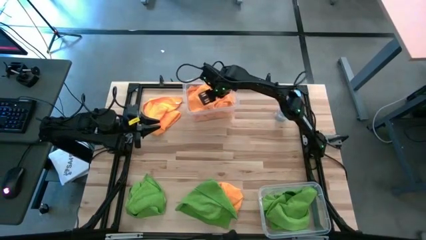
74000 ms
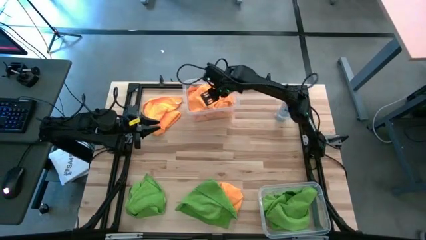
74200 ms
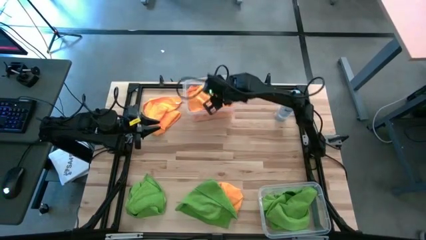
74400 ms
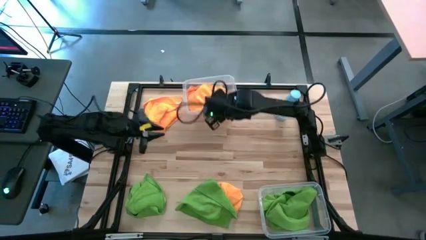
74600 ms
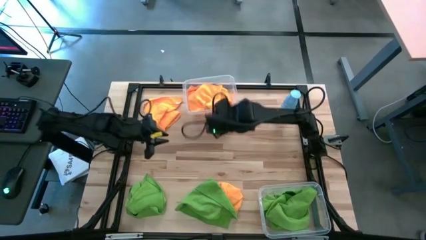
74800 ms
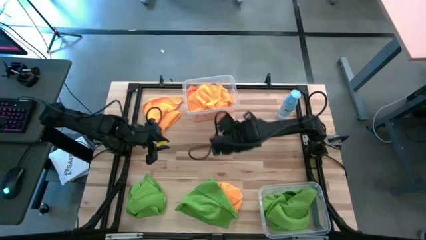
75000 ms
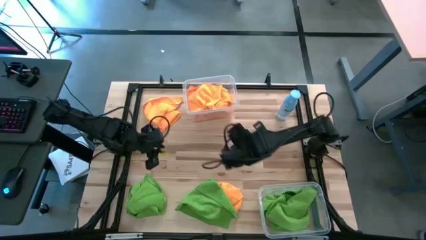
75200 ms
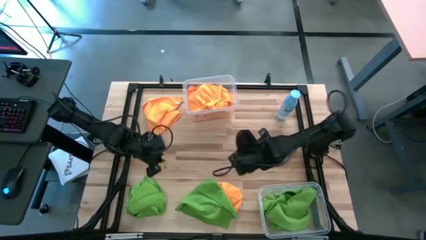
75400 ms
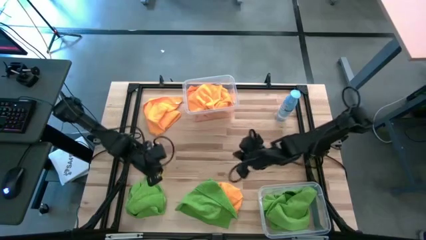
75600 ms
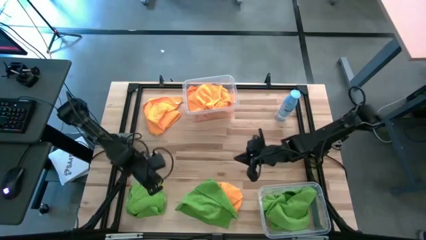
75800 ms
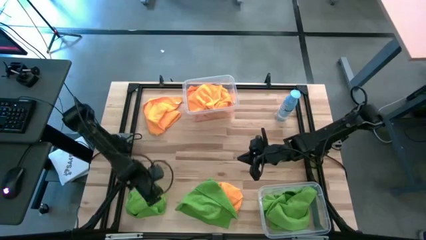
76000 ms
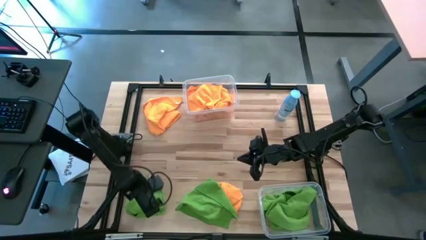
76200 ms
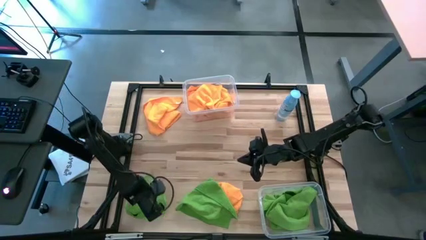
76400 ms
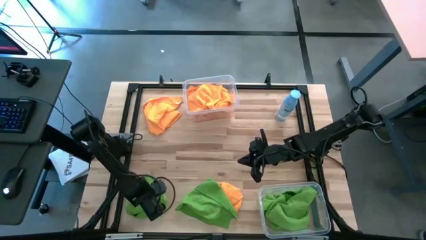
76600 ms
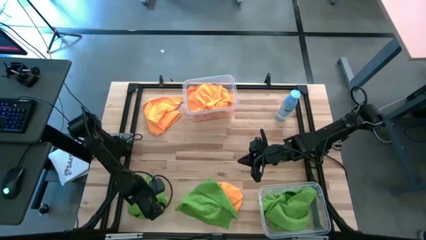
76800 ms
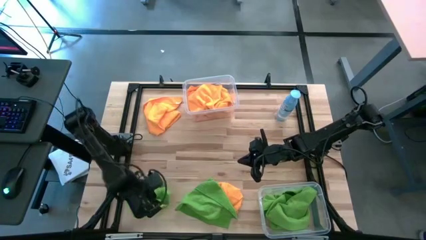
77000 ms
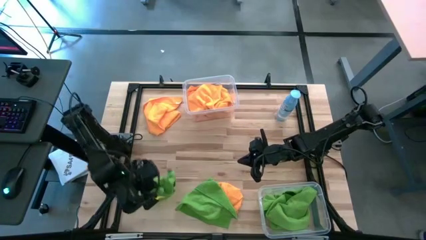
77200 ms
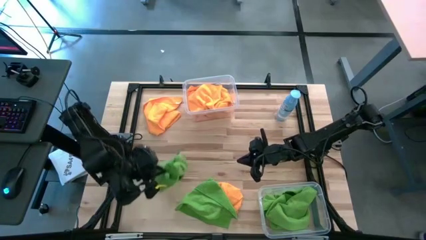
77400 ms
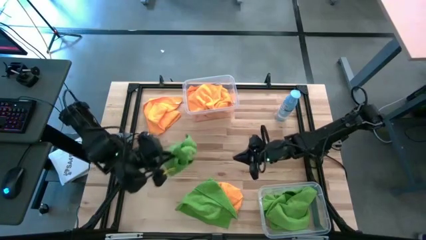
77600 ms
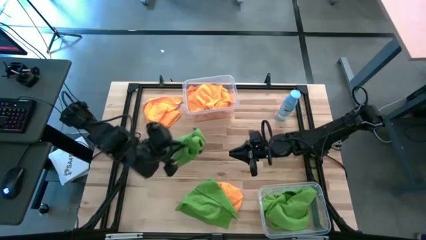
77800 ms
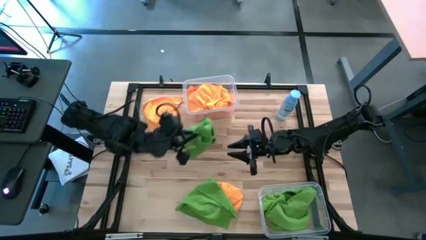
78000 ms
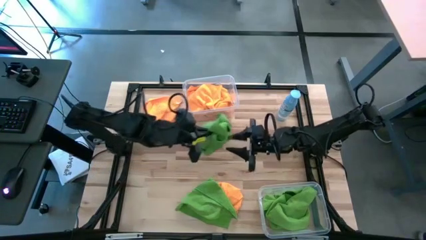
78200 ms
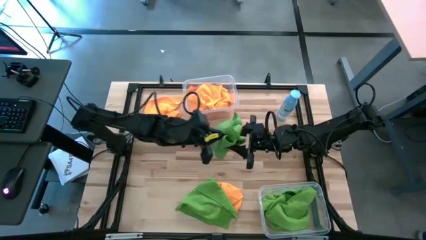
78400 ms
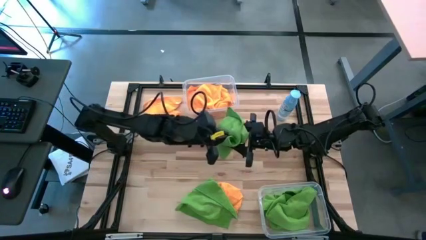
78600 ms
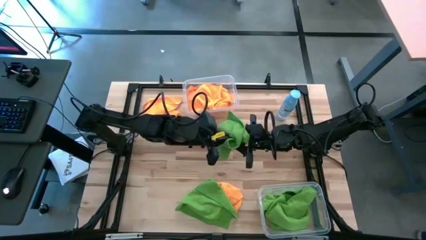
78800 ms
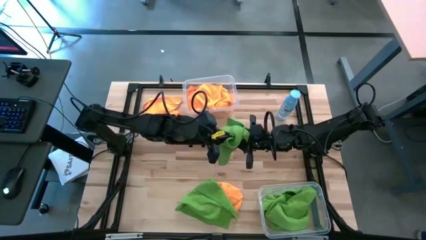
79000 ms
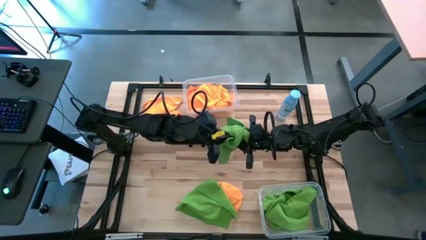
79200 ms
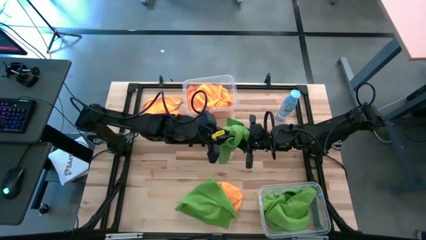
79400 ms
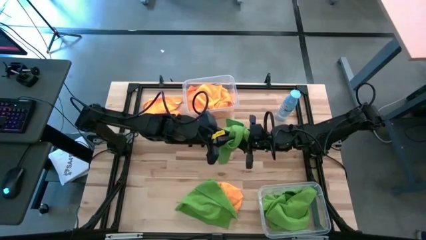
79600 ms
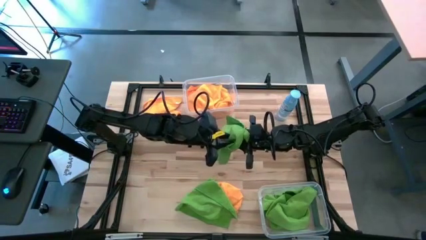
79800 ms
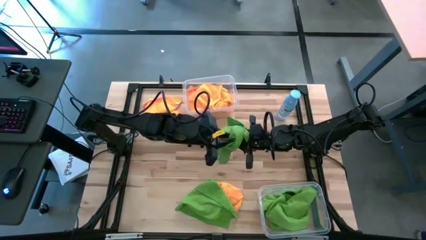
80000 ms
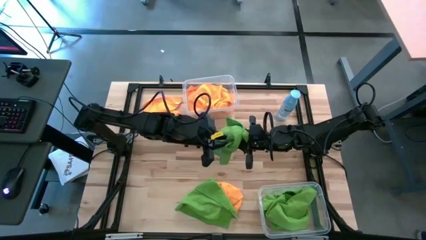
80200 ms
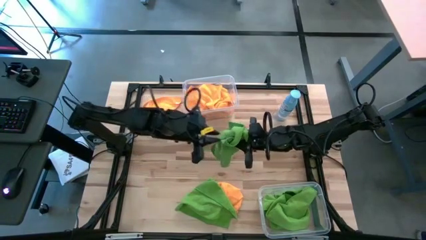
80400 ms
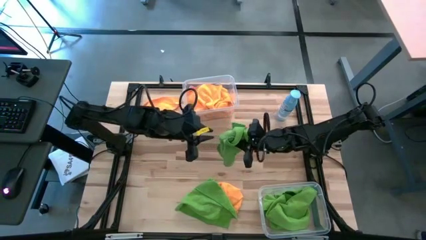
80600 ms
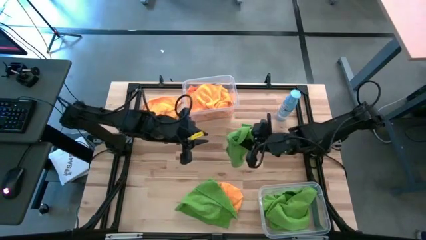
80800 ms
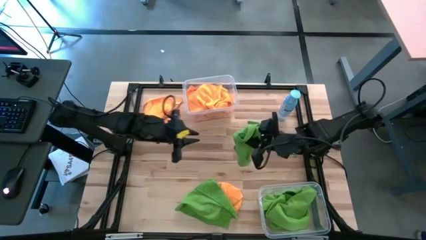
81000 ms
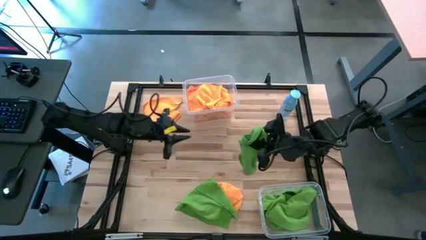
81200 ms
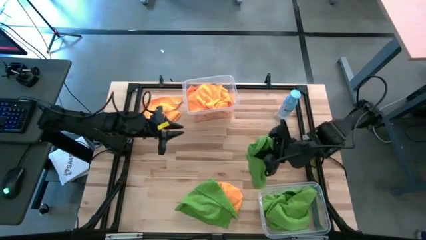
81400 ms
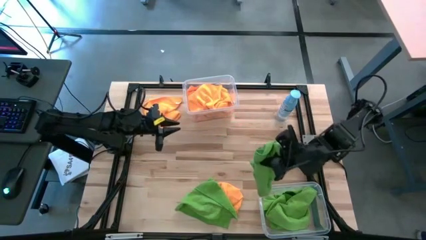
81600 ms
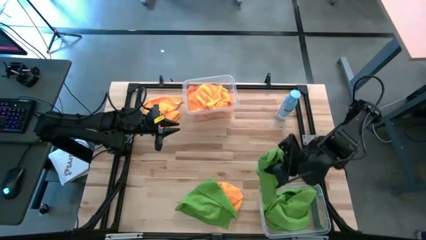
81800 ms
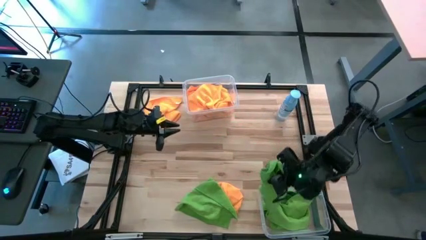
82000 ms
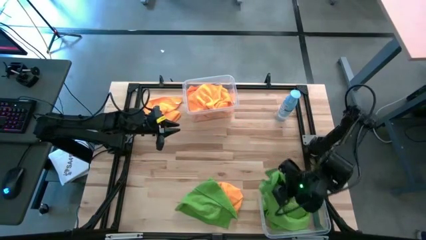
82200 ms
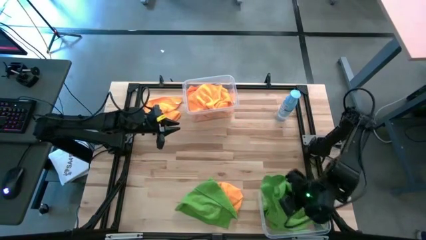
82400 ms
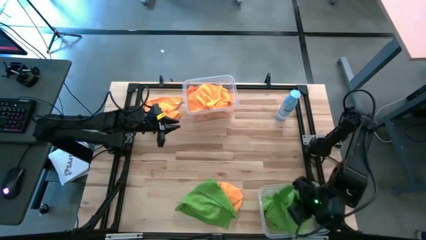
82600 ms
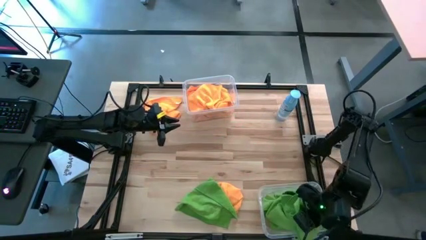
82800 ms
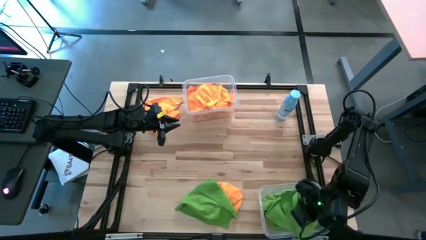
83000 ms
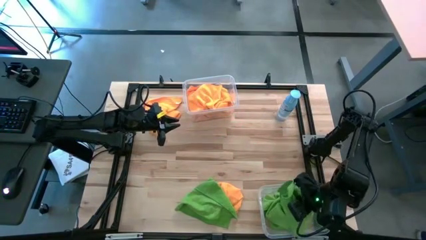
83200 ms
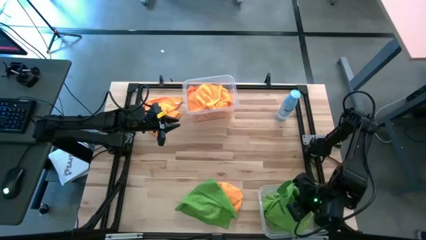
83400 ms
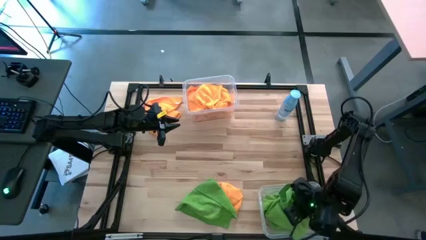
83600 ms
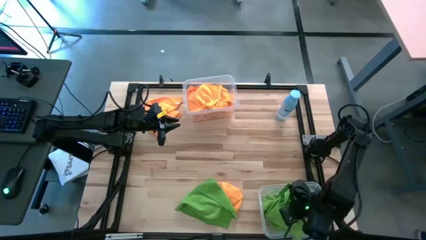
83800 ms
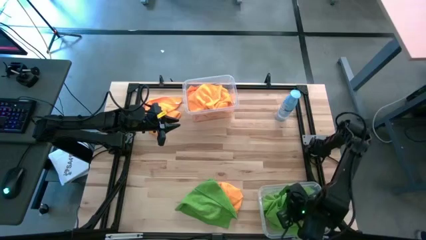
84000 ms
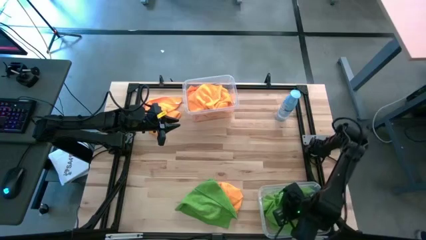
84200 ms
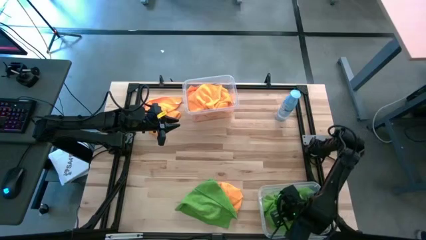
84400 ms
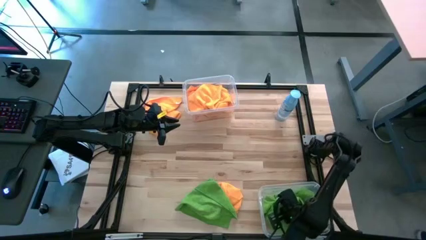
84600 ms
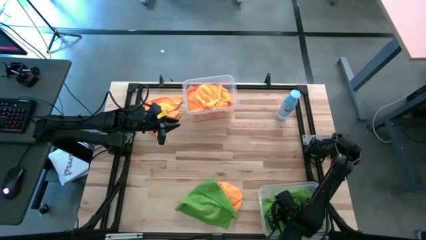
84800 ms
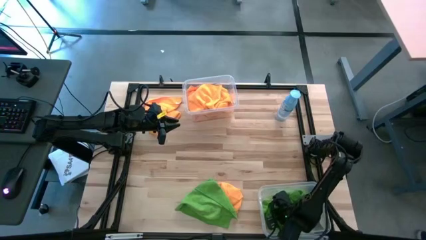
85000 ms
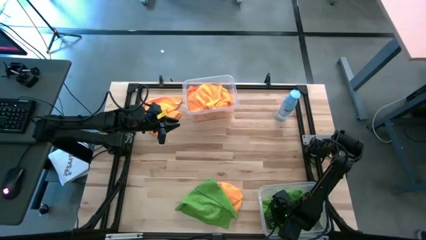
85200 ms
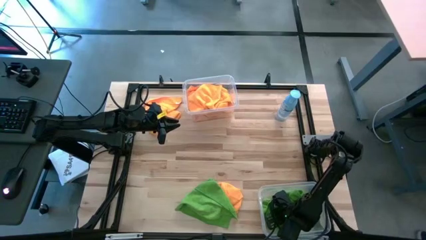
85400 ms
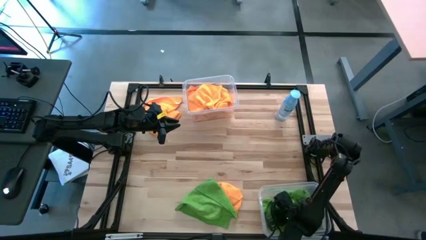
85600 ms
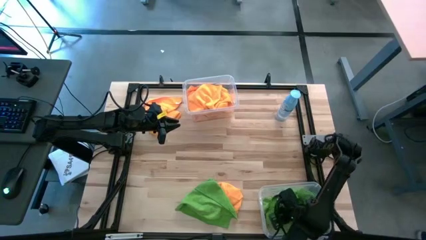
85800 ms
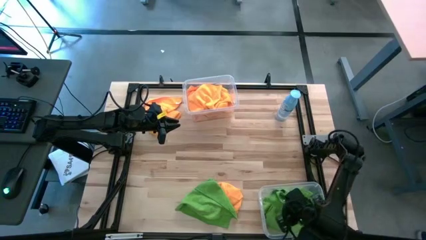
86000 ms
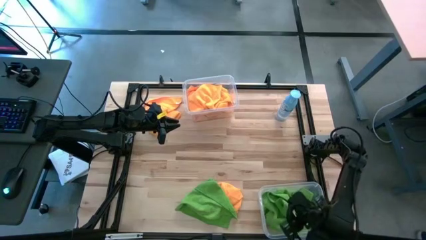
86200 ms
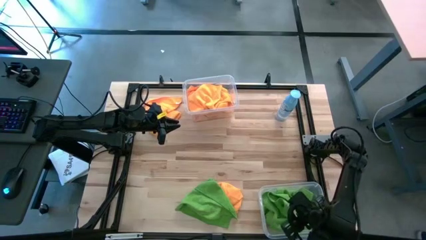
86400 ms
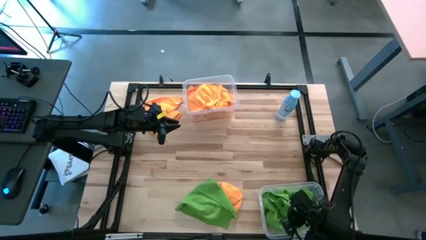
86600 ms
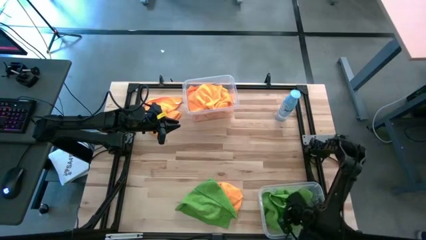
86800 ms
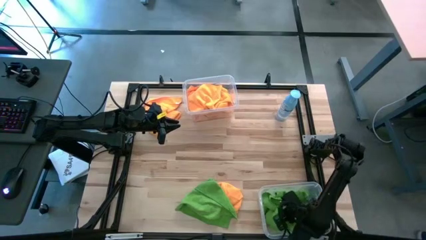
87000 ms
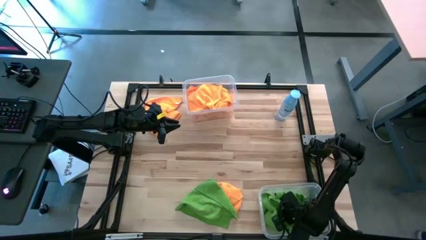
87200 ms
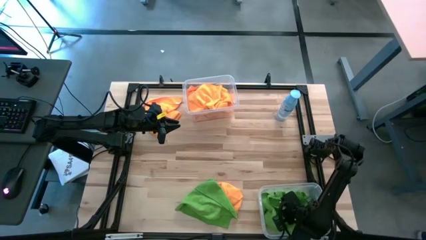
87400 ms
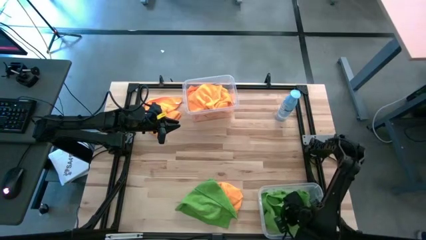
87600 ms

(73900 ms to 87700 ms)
Task: Sort microfiber towel by color & place in baskets
Put the green microfiber towel into the bottom transparent bin
